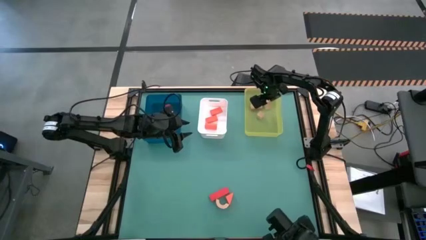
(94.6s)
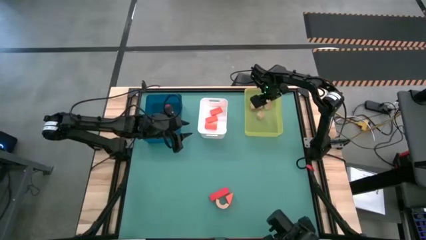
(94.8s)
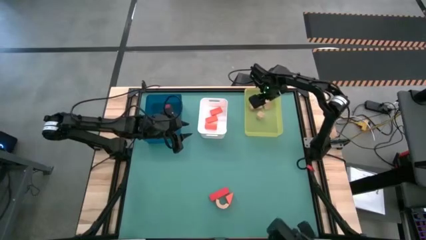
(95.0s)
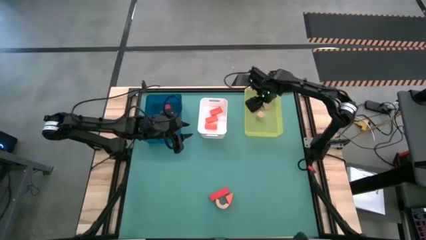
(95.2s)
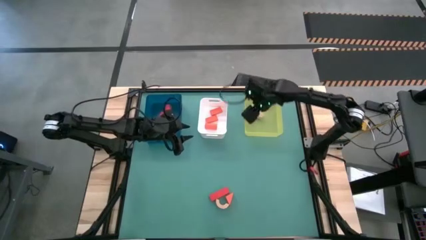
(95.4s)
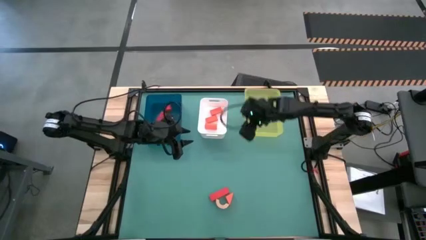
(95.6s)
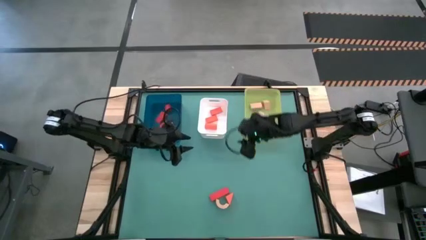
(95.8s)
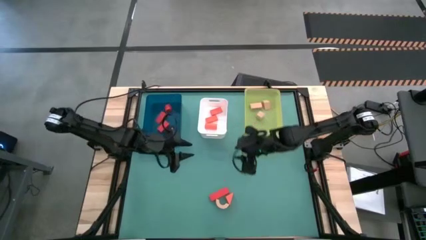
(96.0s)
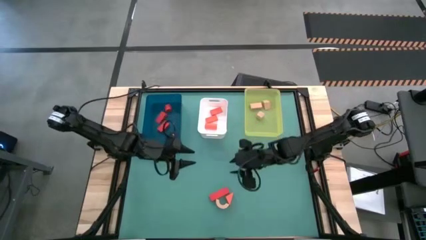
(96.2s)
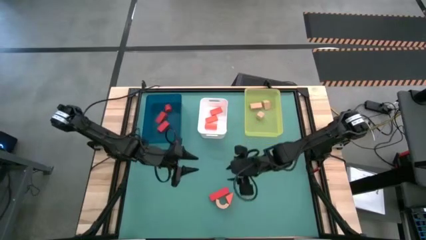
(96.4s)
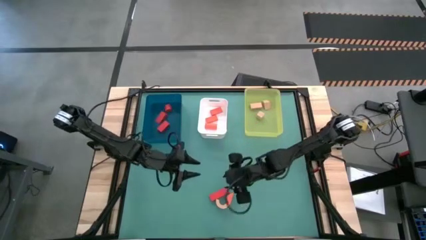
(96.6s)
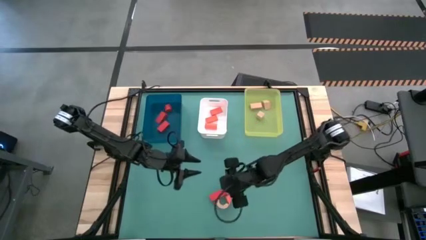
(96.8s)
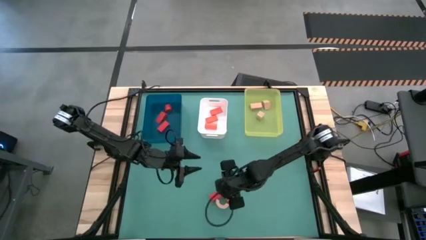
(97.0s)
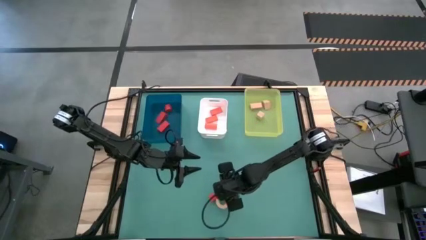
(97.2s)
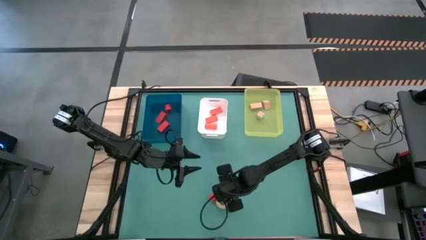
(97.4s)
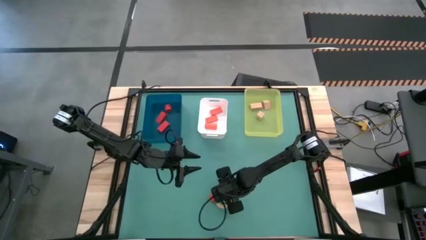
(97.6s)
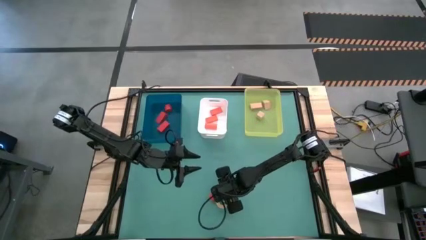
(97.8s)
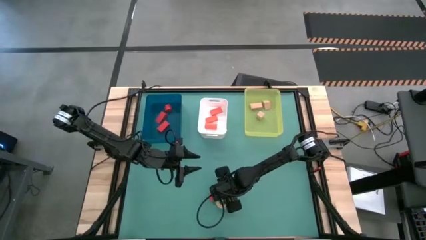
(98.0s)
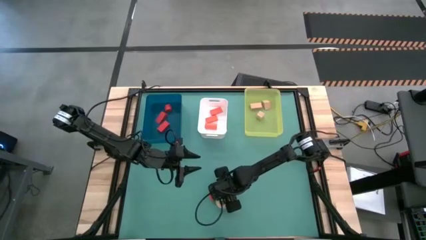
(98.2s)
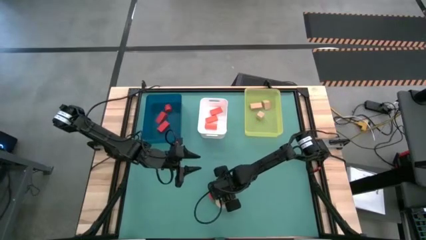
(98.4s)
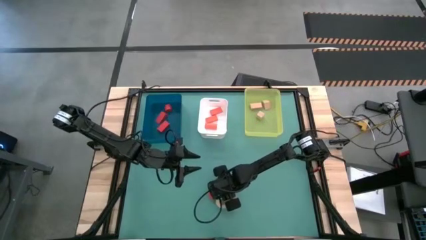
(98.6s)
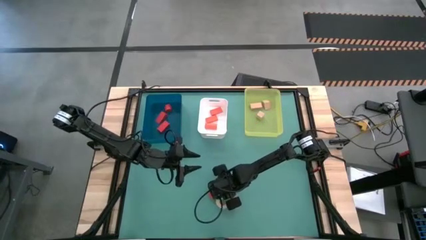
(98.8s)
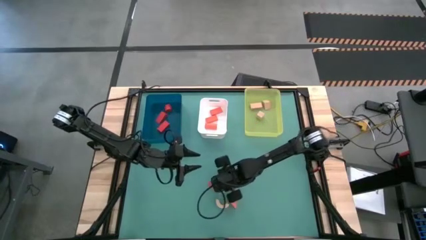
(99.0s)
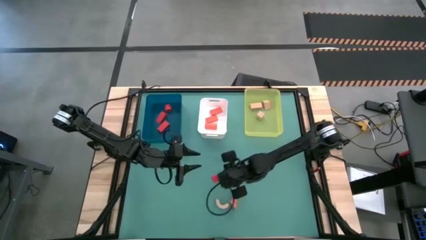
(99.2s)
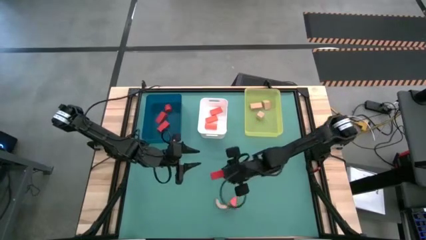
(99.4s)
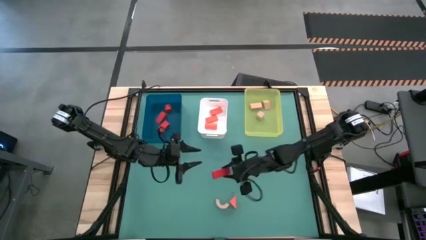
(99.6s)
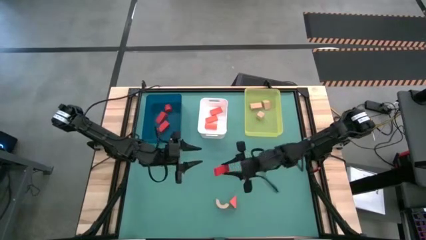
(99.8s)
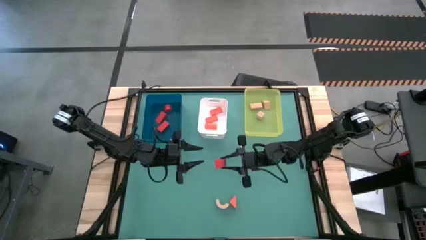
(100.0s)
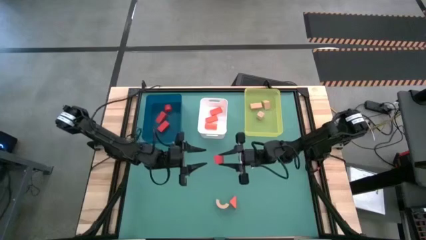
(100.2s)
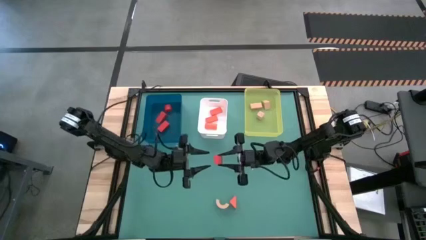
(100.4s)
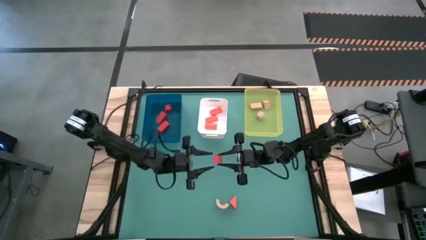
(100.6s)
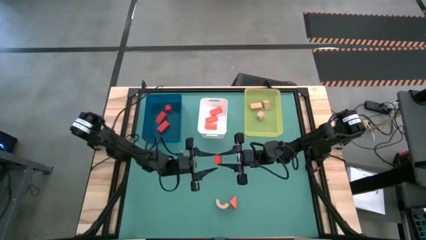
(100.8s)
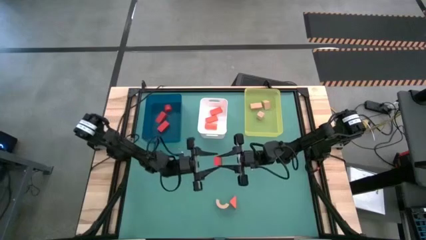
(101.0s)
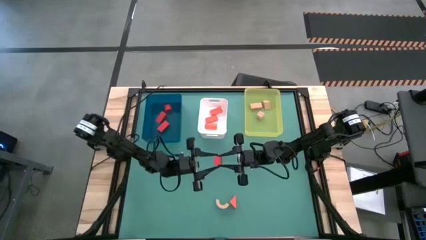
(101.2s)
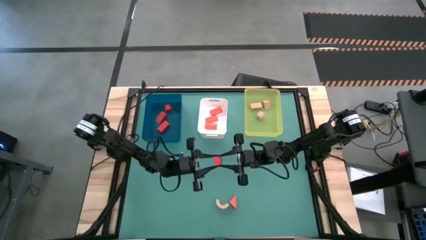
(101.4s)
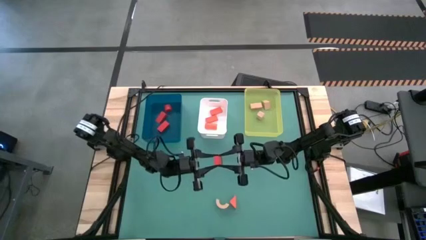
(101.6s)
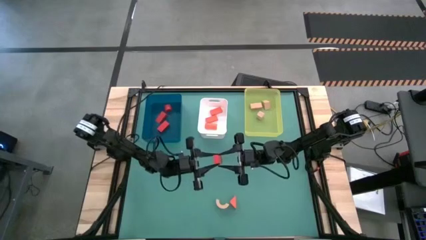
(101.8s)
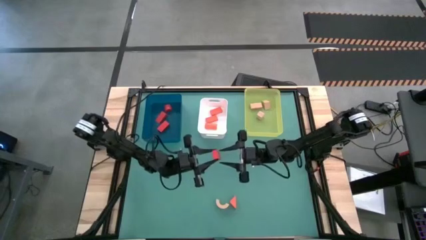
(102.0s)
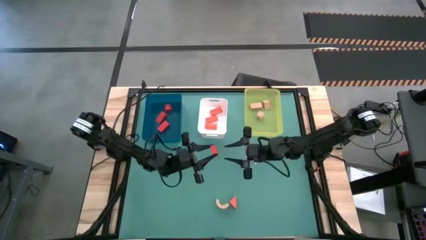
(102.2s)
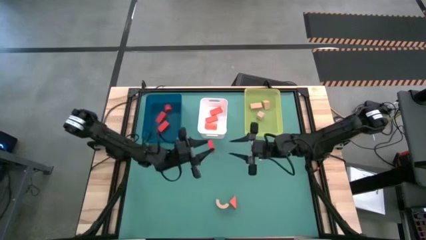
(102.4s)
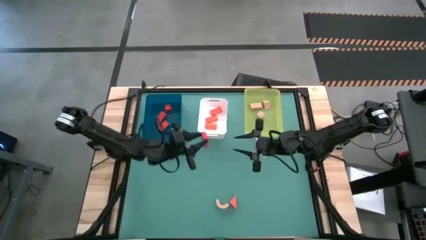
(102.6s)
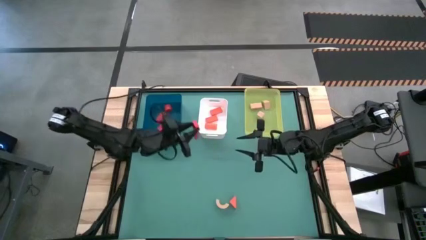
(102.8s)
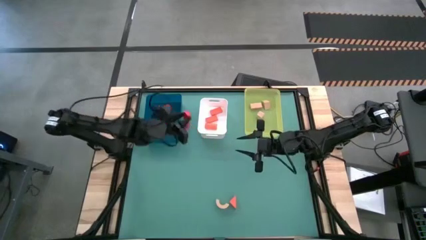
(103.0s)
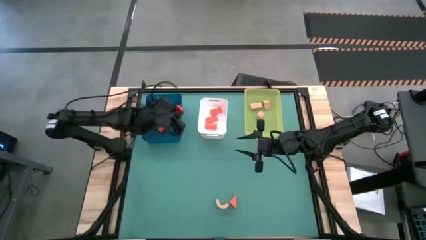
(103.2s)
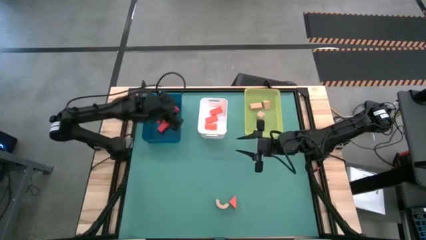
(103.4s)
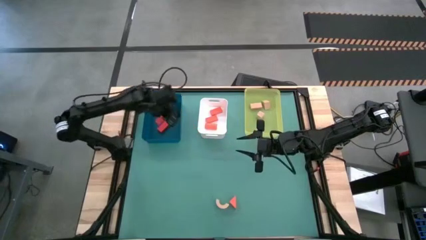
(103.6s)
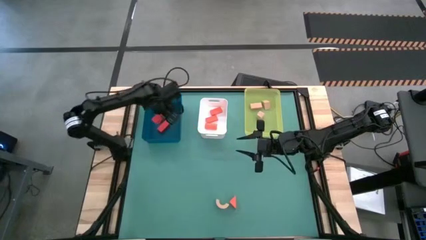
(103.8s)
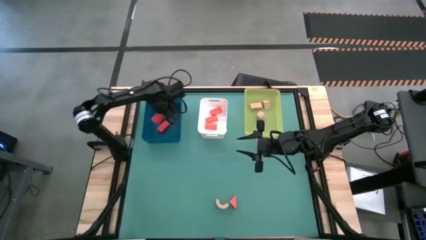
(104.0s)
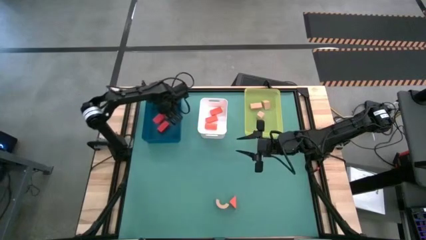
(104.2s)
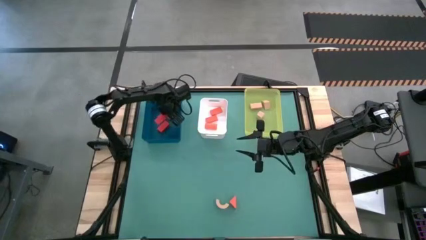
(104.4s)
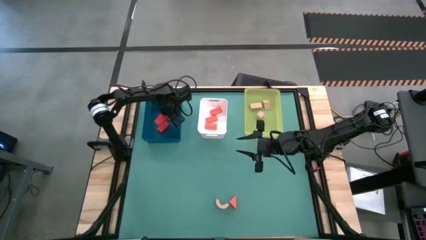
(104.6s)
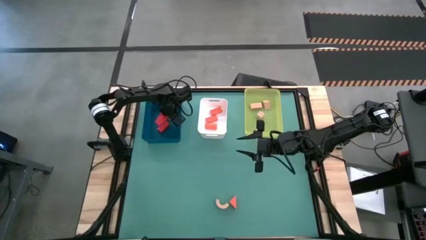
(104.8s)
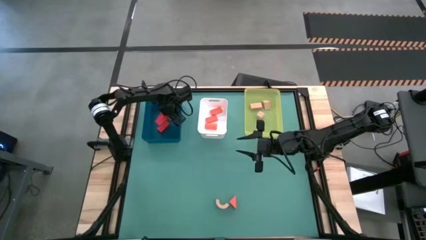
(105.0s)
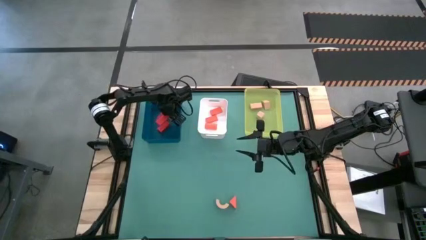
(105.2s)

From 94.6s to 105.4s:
Task: Sort & place blocks by color
Put the red block into the blue bin

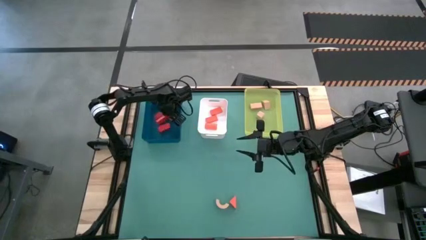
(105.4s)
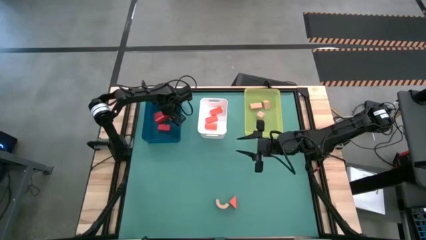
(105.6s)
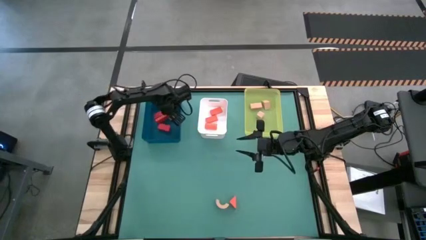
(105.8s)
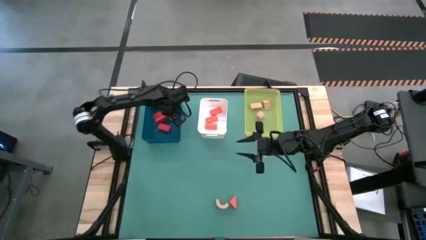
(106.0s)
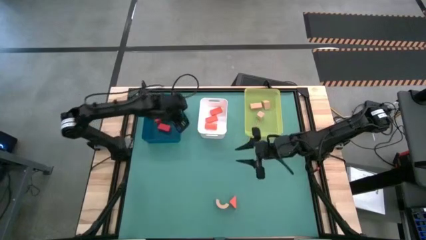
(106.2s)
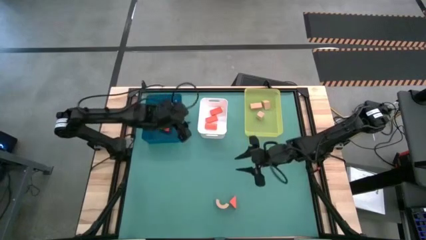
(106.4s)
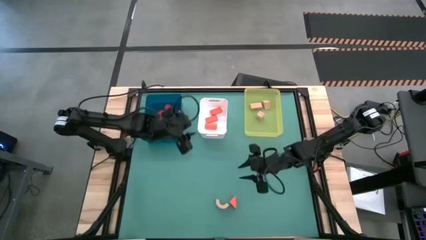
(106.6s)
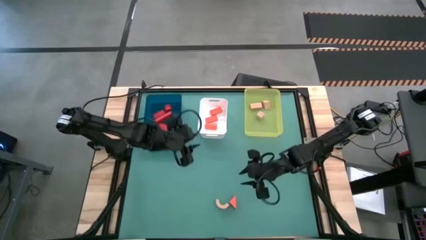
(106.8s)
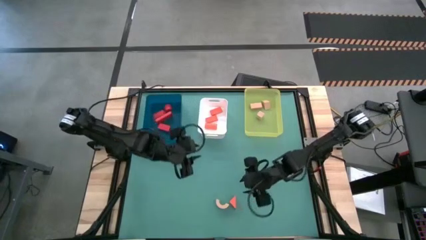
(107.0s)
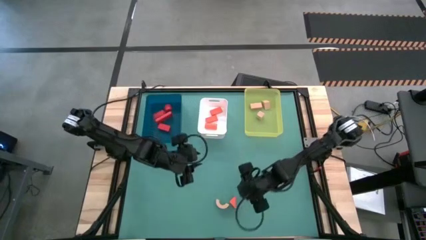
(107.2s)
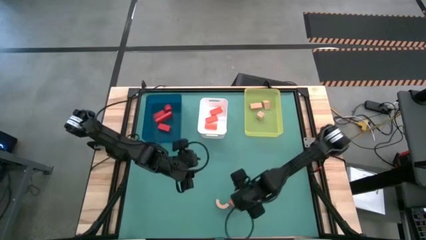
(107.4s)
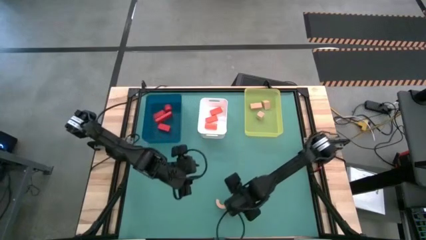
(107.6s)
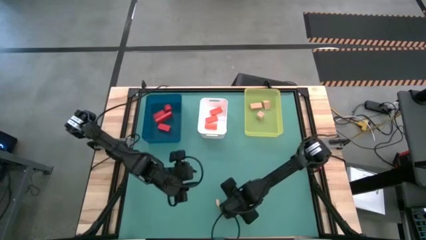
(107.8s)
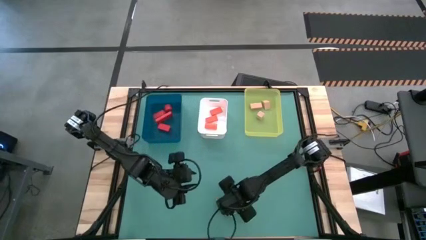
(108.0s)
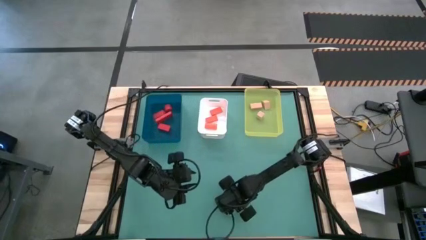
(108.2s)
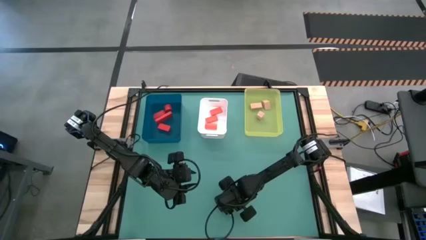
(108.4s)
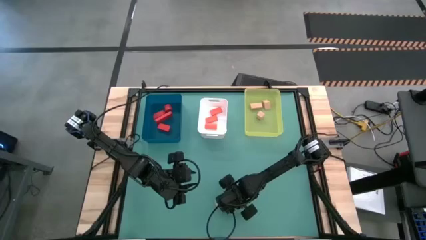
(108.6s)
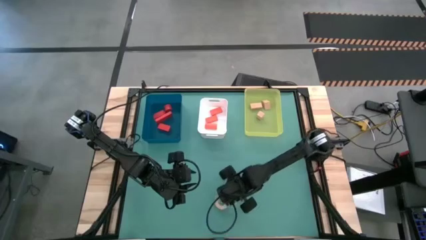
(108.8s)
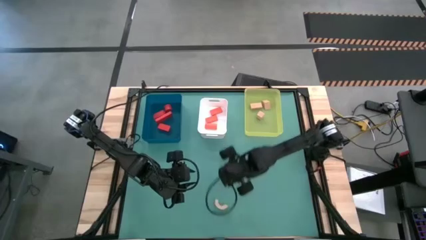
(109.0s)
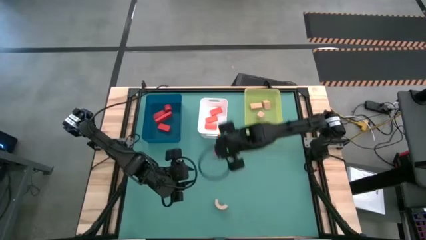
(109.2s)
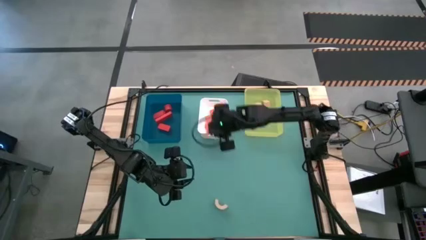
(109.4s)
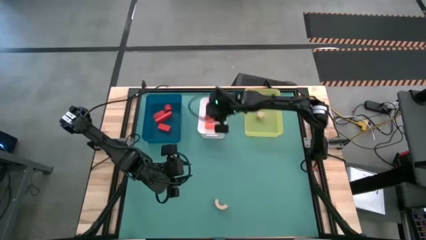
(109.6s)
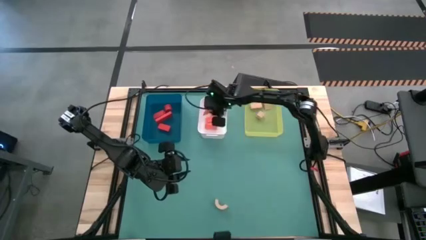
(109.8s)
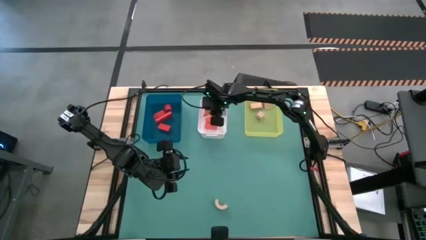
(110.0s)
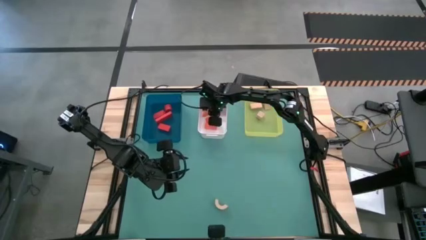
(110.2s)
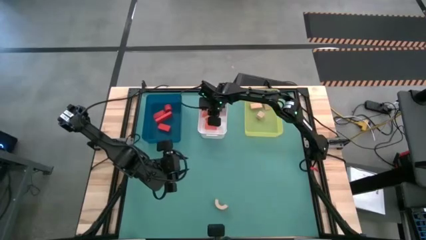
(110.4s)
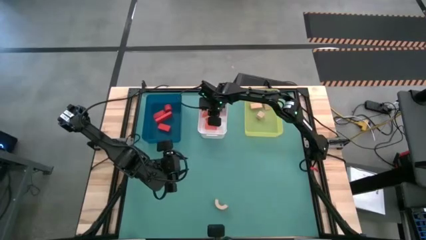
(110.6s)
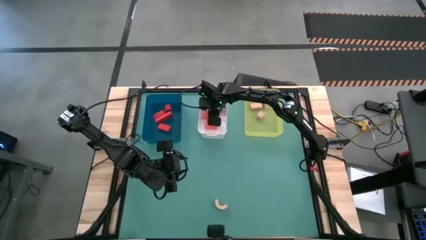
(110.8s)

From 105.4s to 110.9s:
Put the orange block into the white bin
